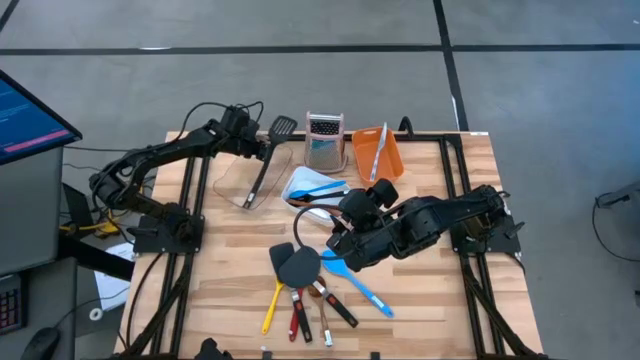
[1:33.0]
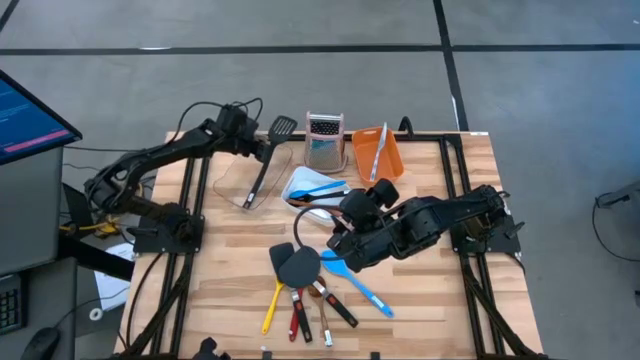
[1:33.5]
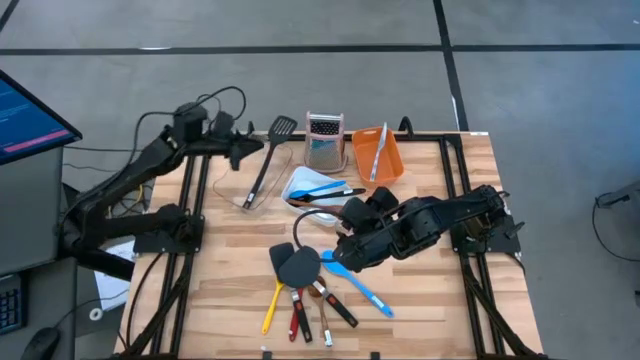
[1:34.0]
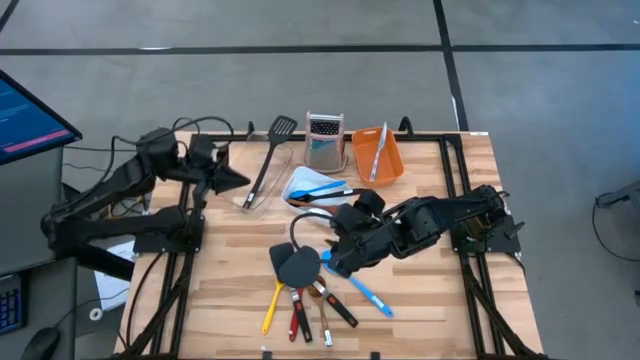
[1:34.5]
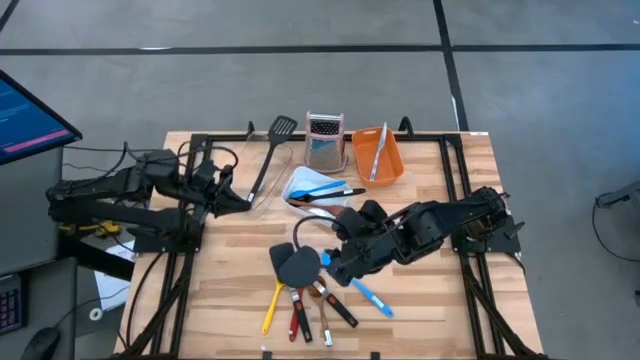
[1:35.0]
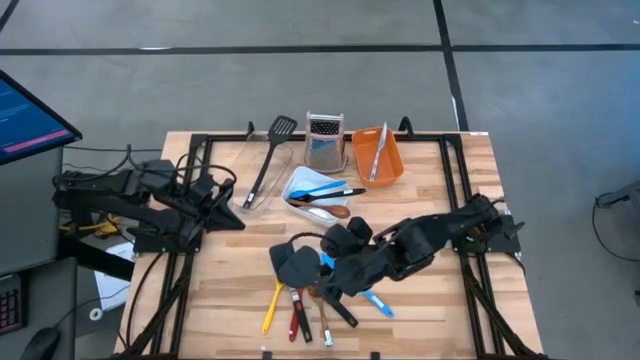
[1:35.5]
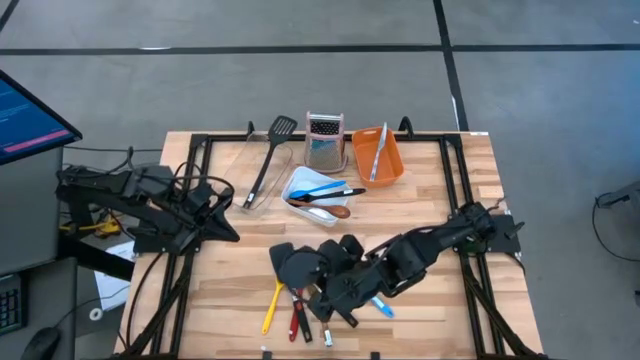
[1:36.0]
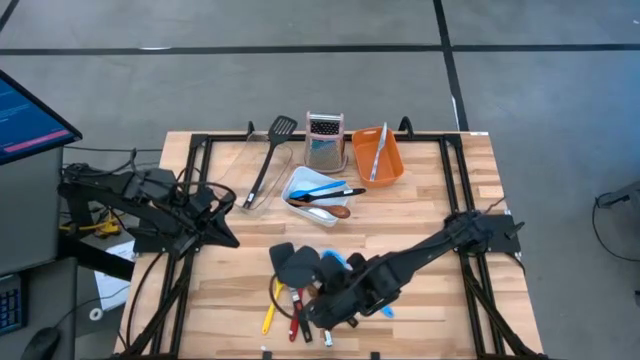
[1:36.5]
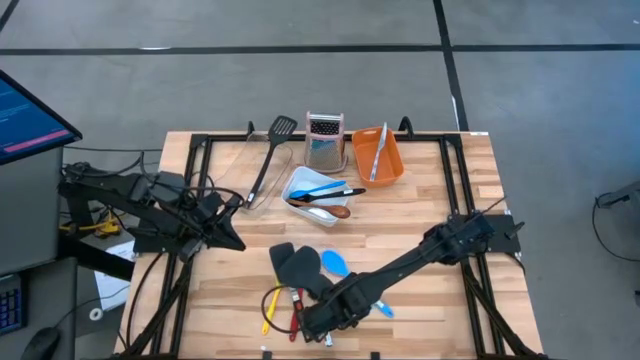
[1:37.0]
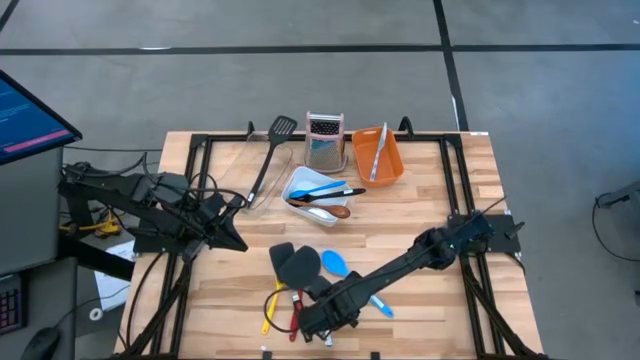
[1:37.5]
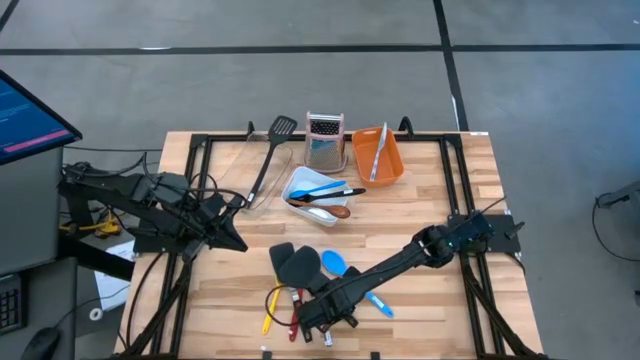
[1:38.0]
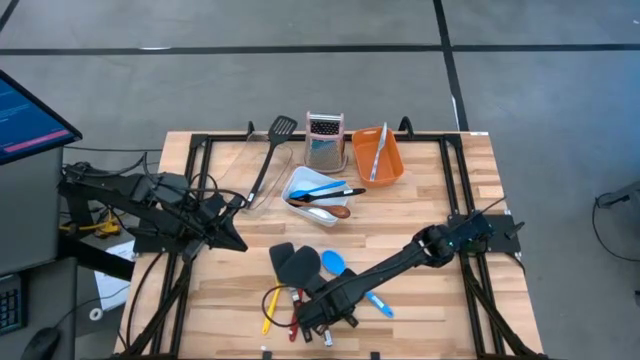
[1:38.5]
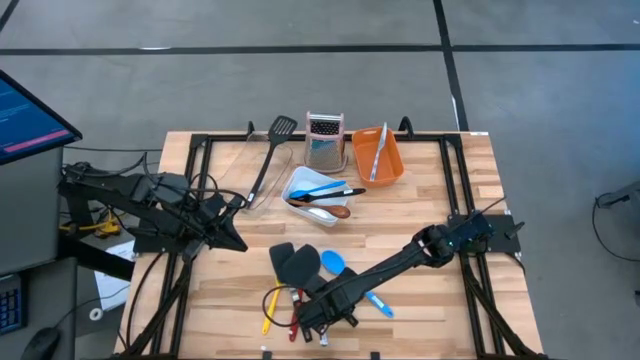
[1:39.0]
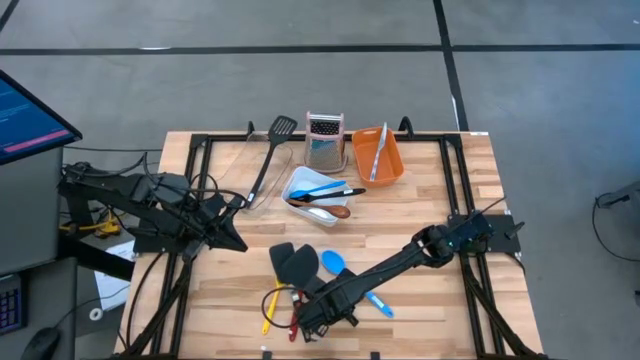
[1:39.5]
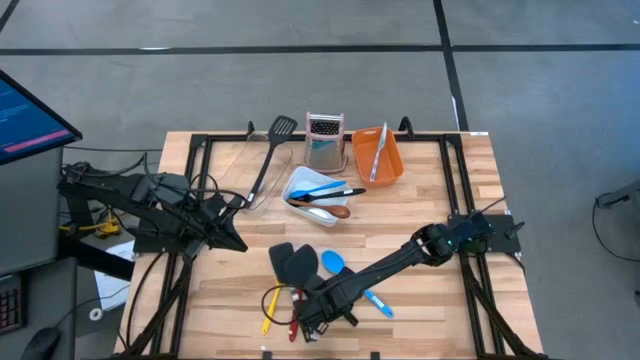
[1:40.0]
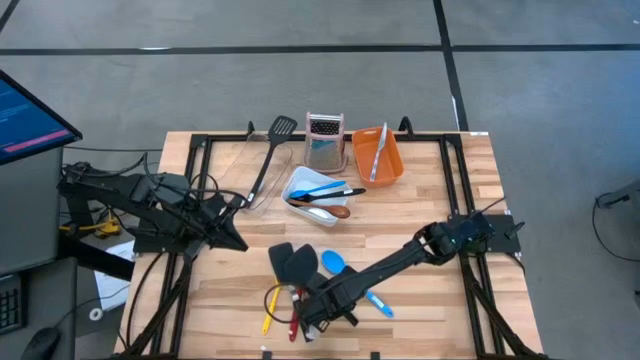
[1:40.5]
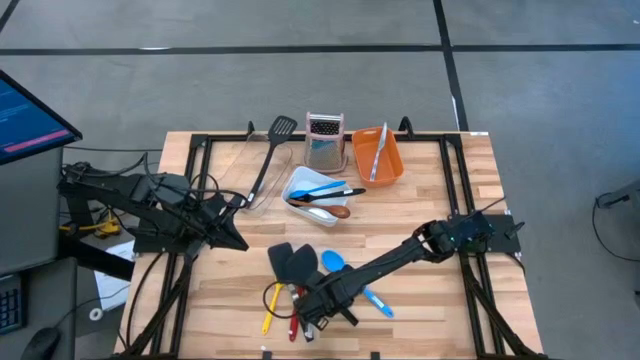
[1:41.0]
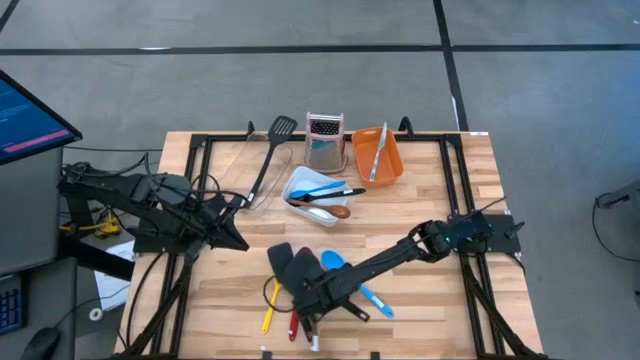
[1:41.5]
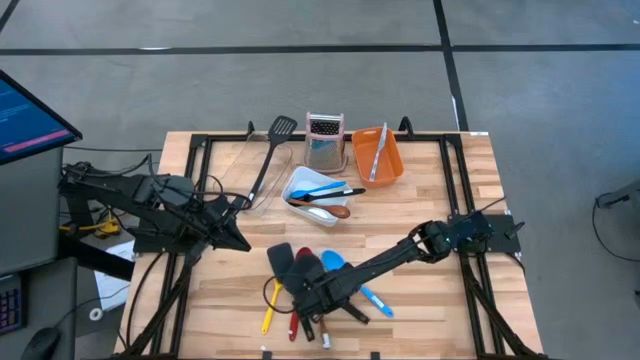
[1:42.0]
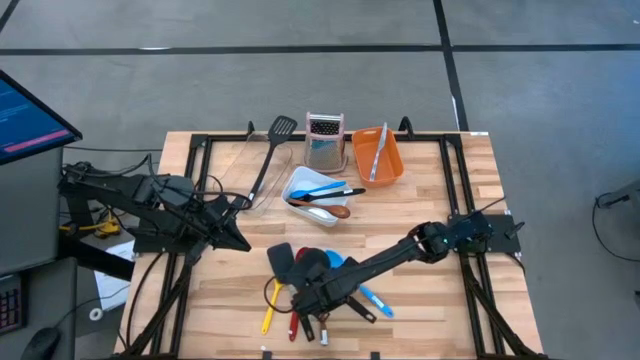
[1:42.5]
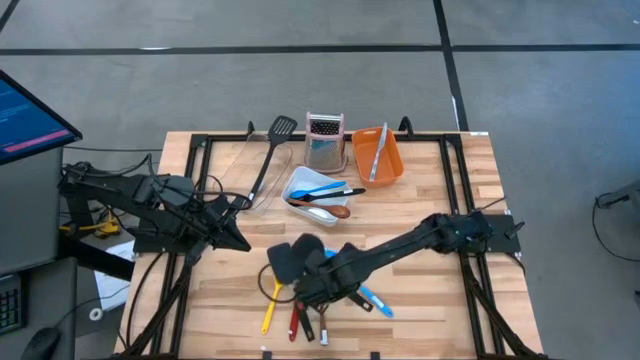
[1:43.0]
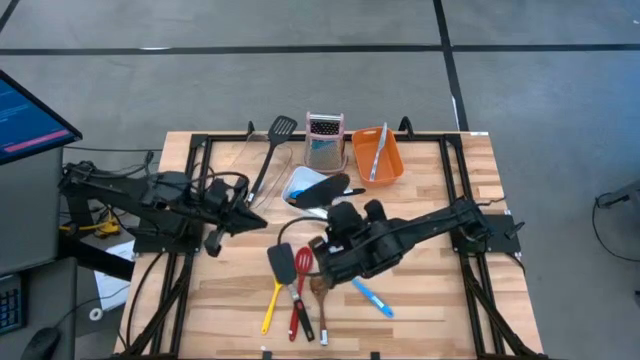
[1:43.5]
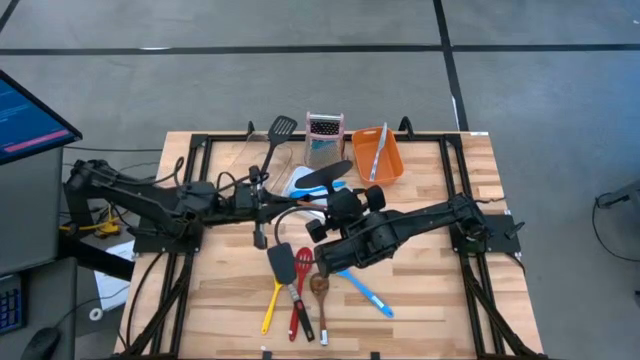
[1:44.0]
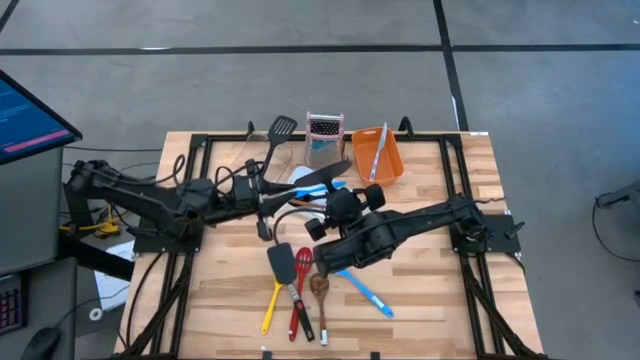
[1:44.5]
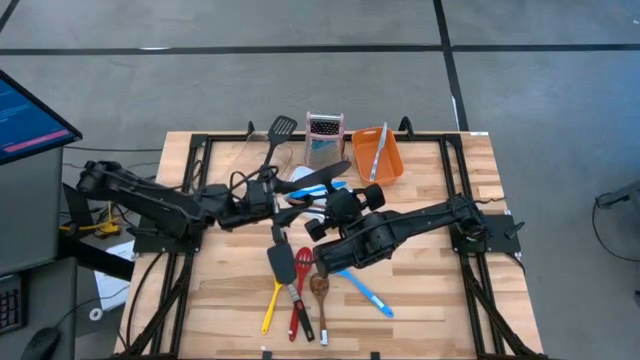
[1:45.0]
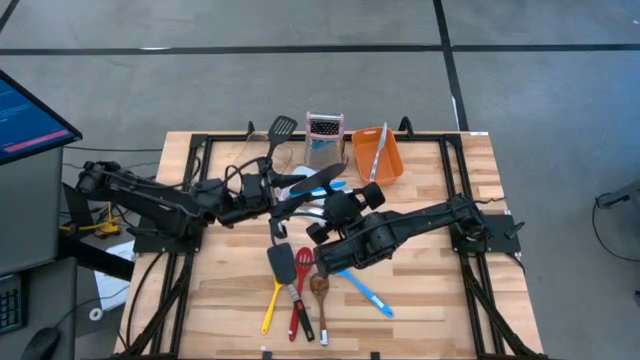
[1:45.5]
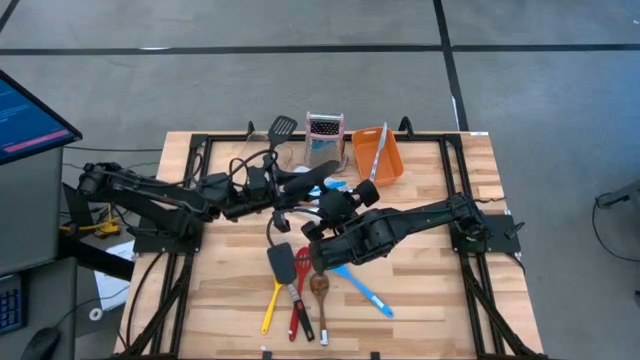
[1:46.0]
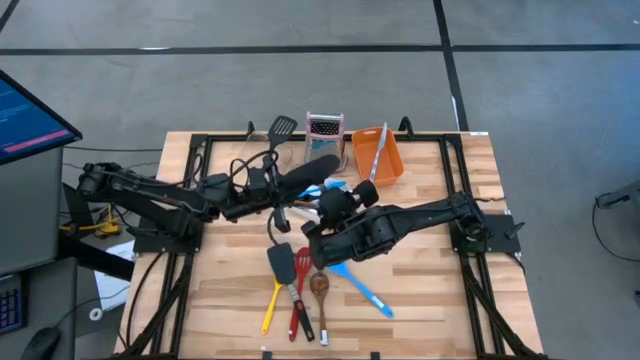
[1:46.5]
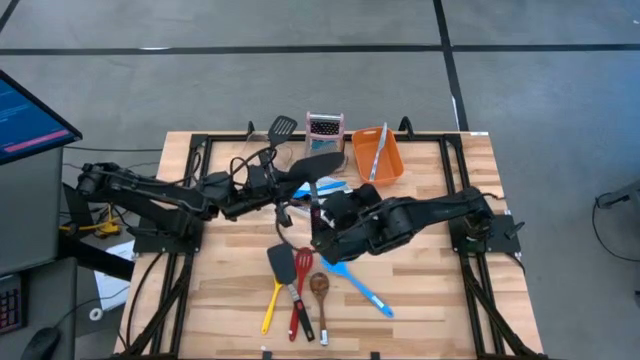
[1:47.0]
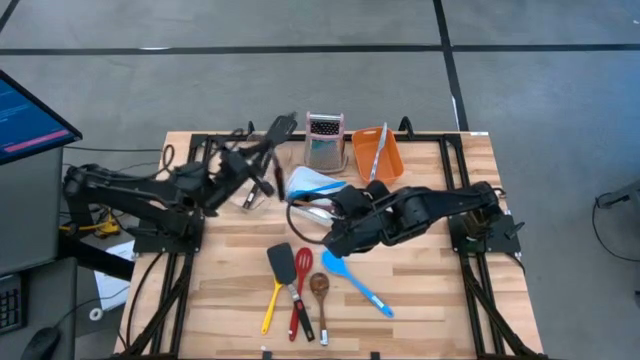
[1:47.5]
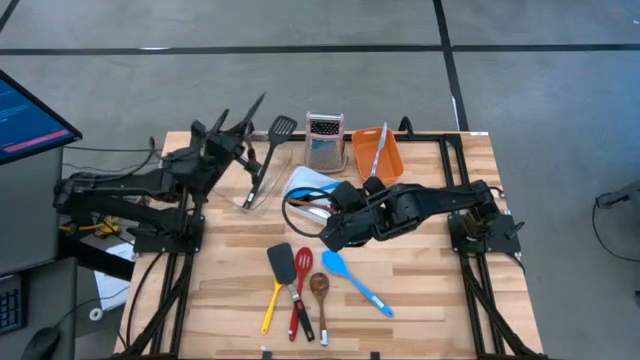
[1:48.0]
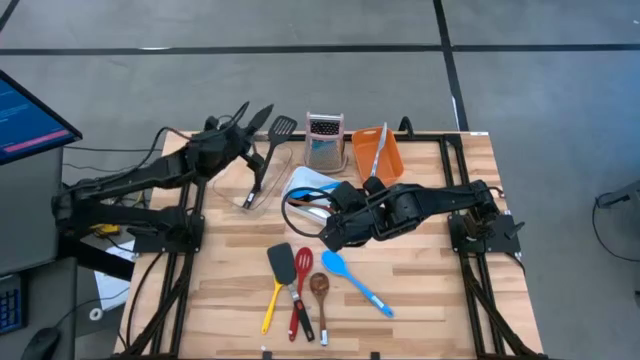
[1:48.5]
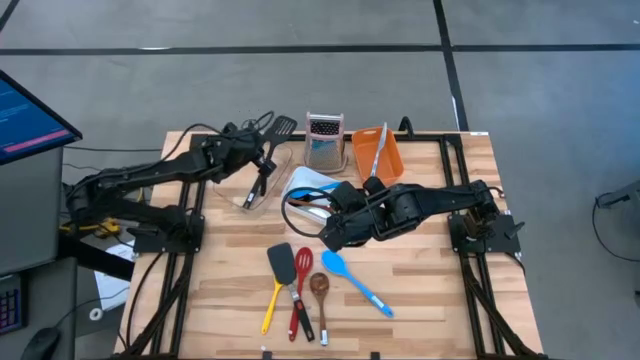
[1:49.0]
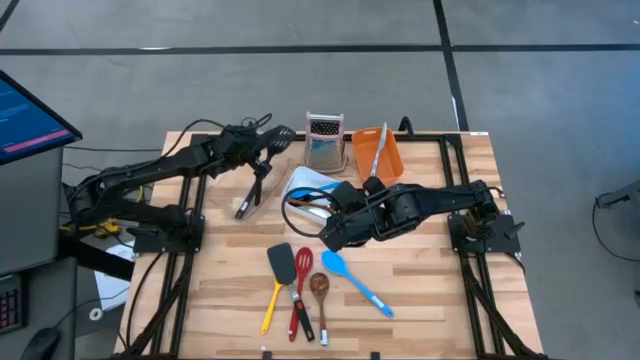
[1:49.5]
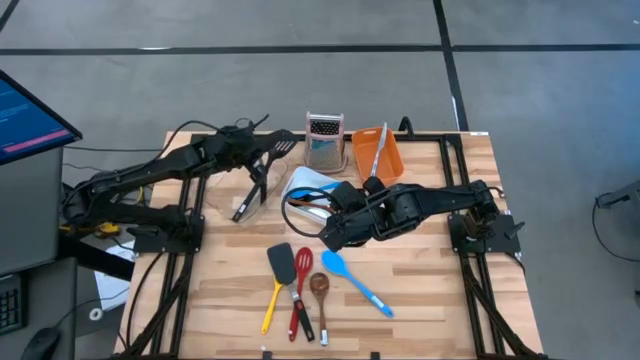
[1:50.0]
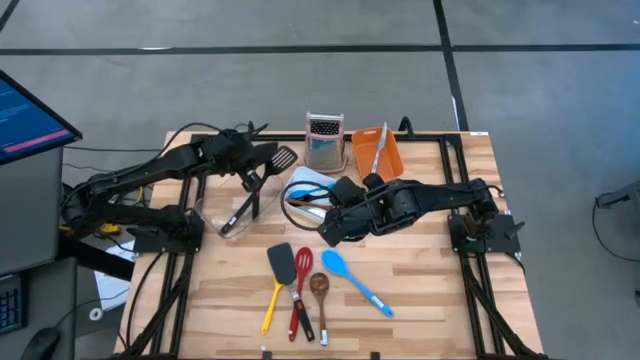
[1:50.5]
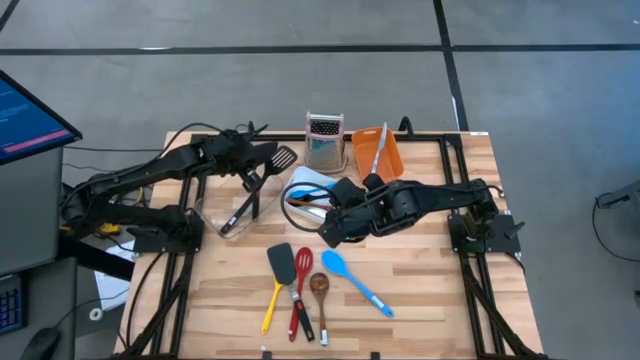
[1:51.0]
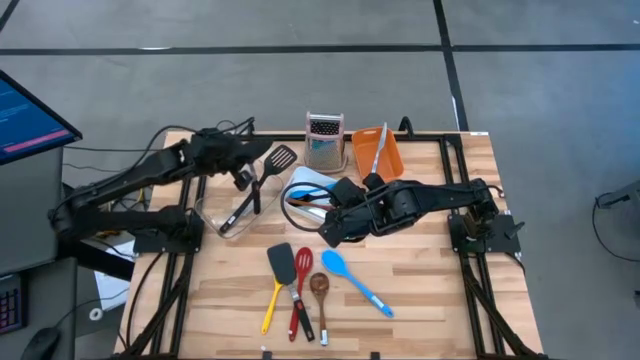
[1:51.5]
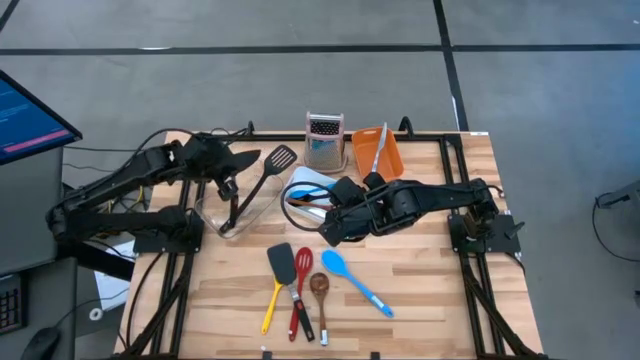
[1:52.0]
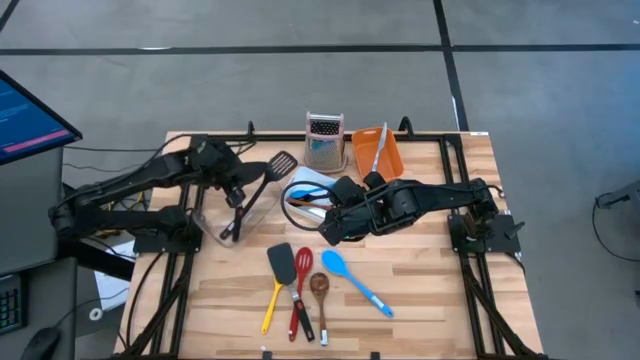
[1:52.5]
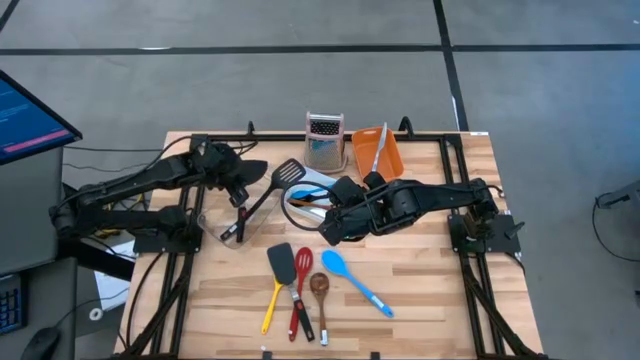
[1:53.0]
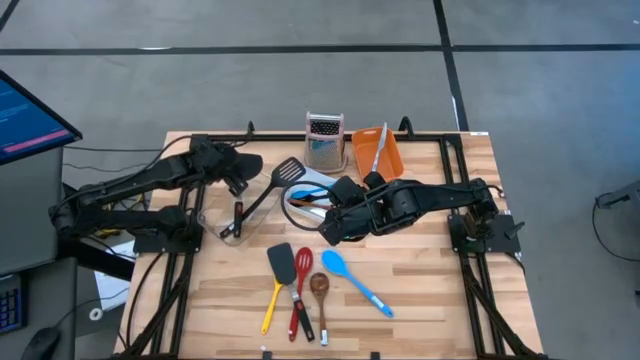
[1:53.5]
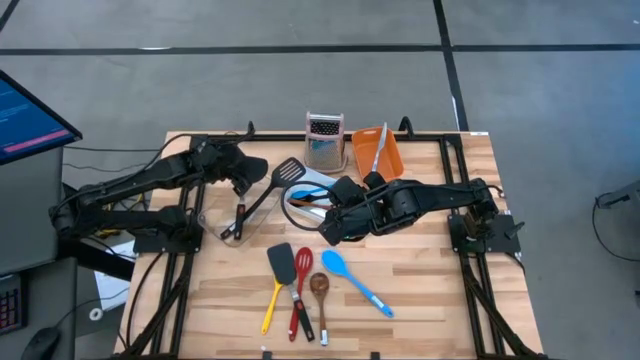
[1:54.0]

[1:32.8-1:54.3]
Task: Pick & Place Kitchen Items
Put the black turner spatula into the transparent bin
